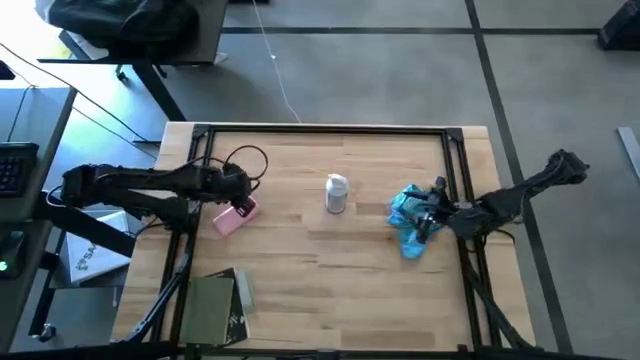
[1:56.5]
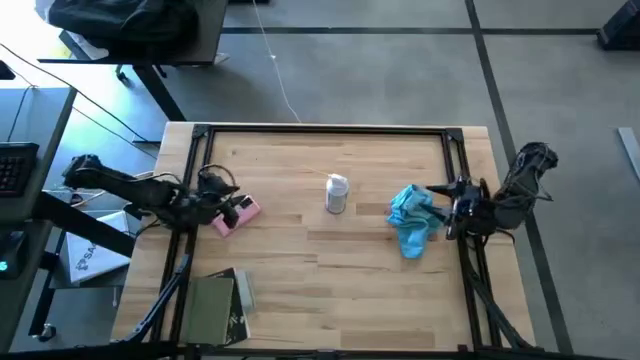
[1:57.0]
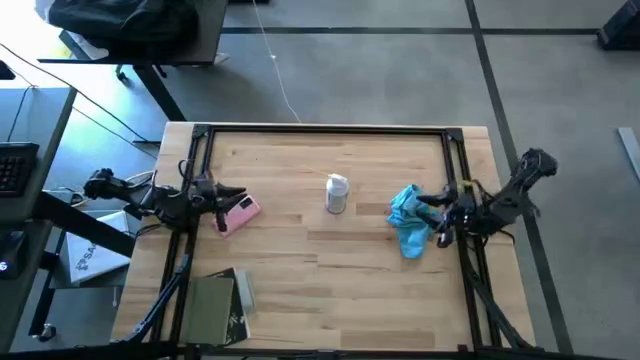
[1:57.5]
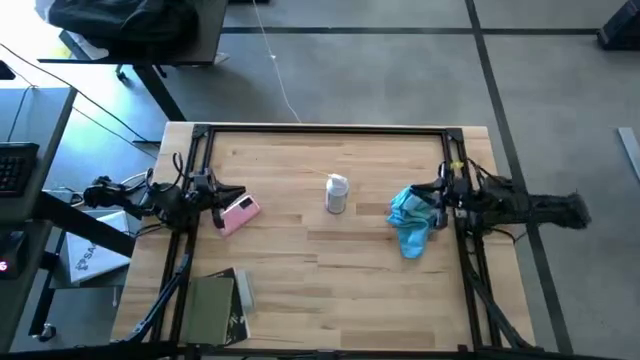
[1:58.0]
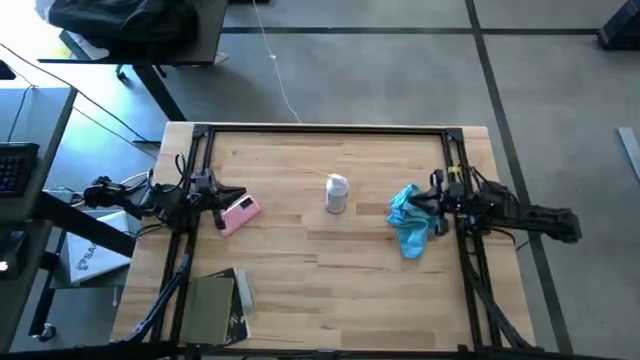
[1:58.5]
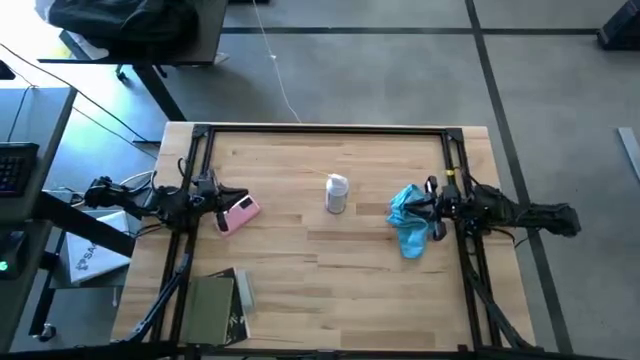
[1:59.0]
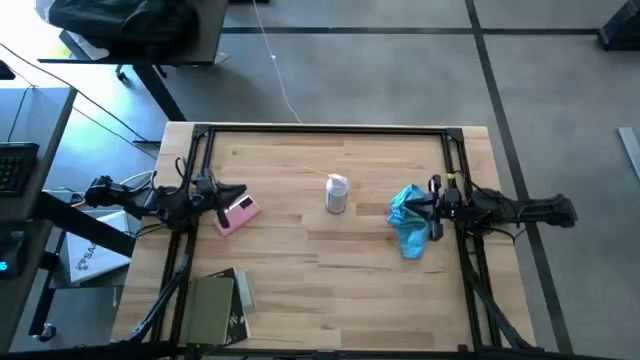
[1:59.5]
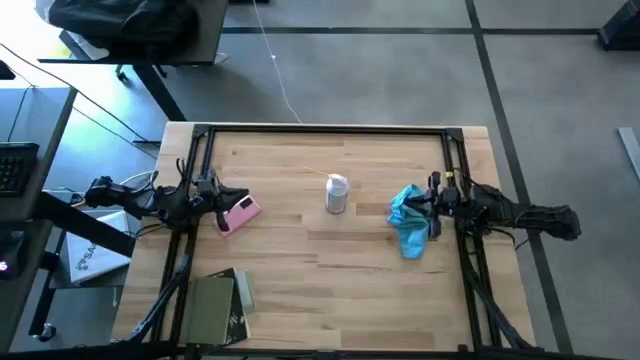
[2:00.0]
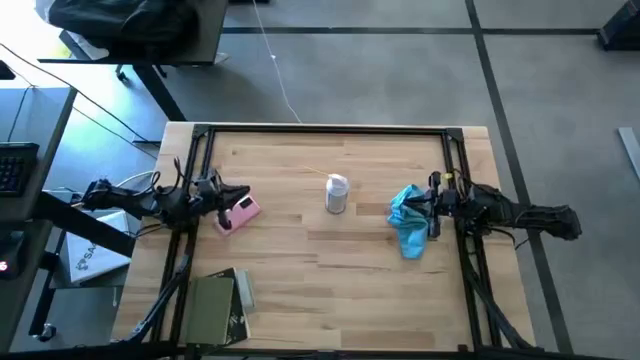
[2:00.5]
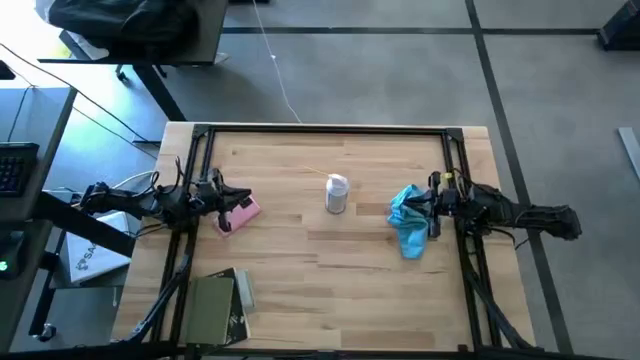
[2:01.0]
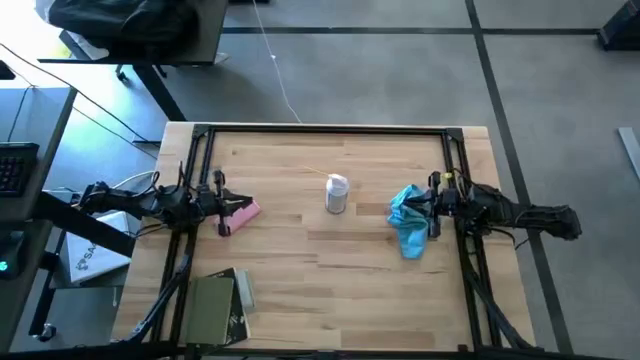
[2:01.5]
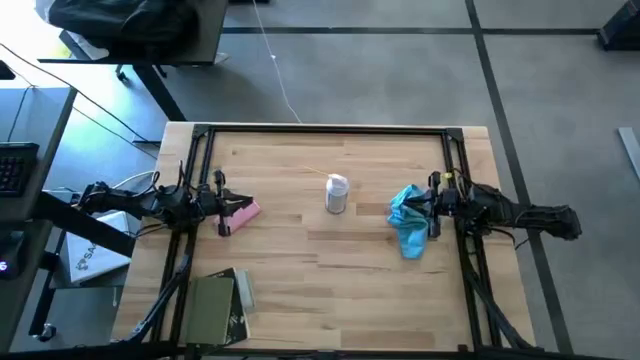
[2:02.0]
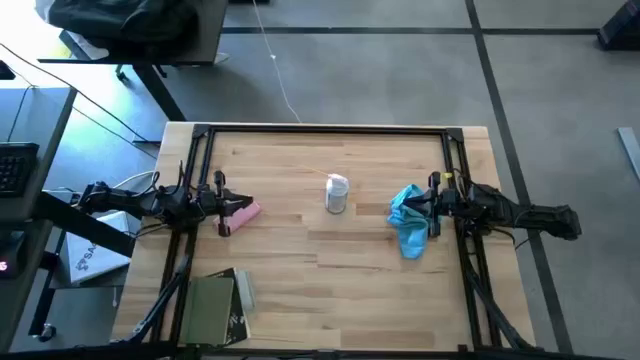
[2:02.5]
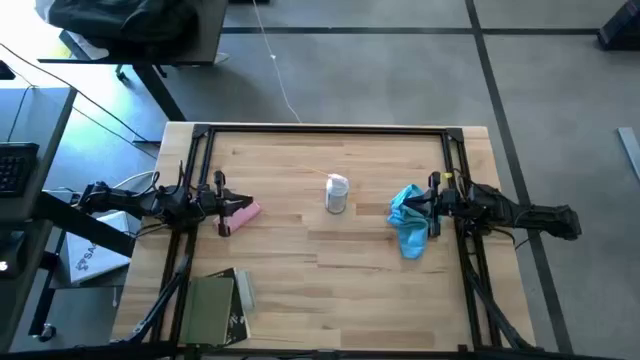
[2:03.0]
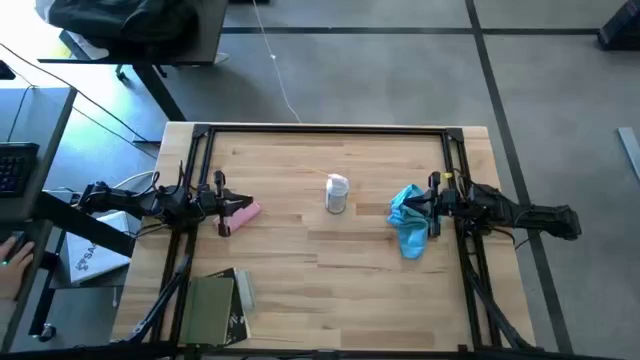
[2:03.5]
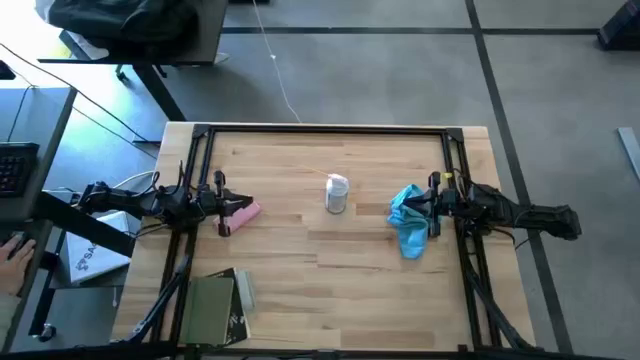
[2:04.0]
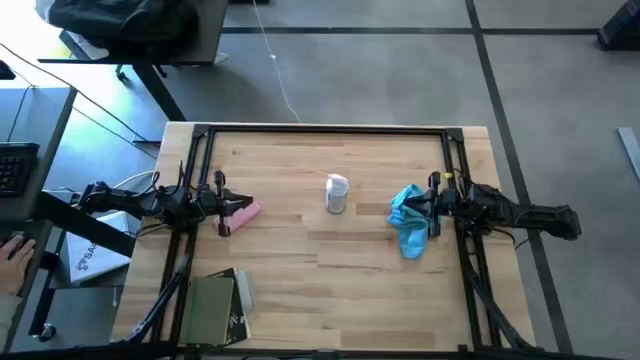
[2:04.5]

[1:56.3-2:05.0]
Task: Apply microfiber cloth
Return to Home Position

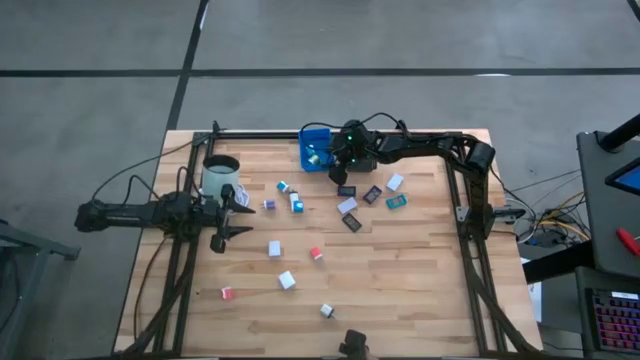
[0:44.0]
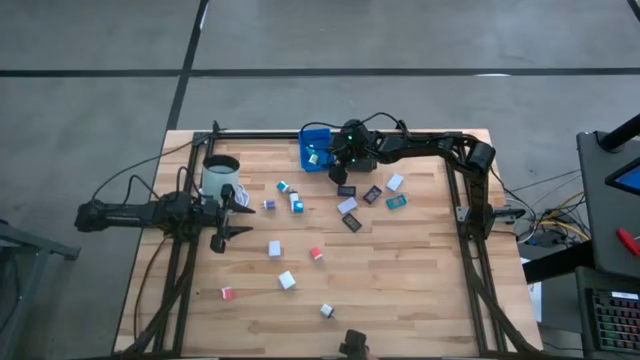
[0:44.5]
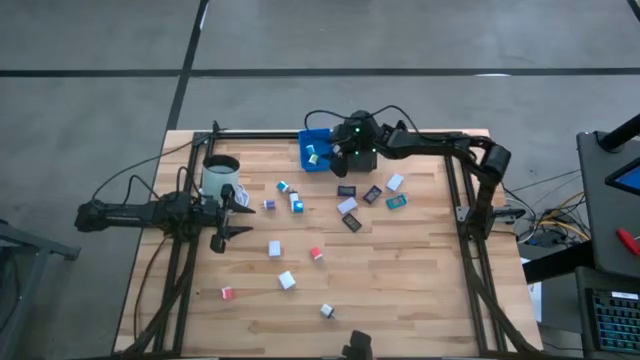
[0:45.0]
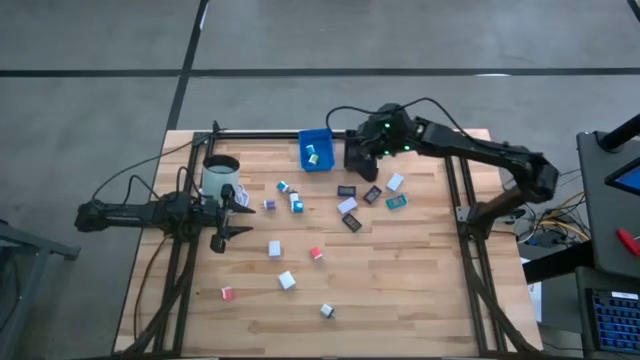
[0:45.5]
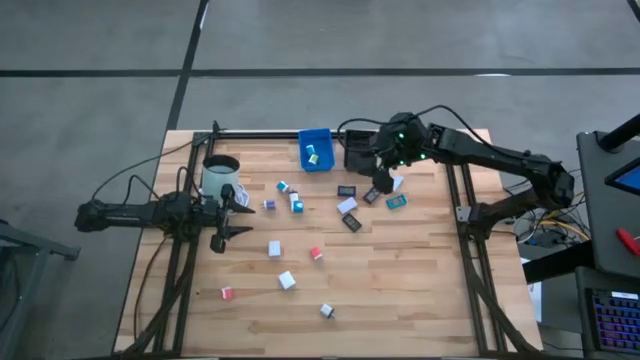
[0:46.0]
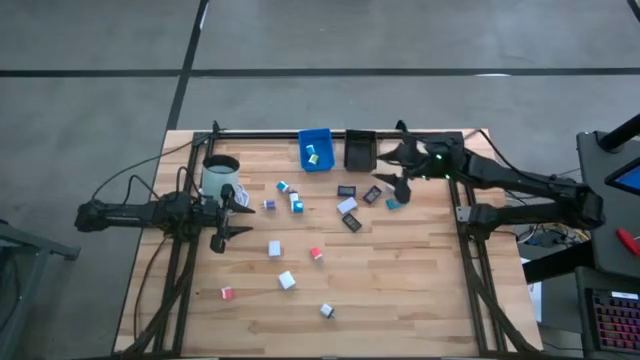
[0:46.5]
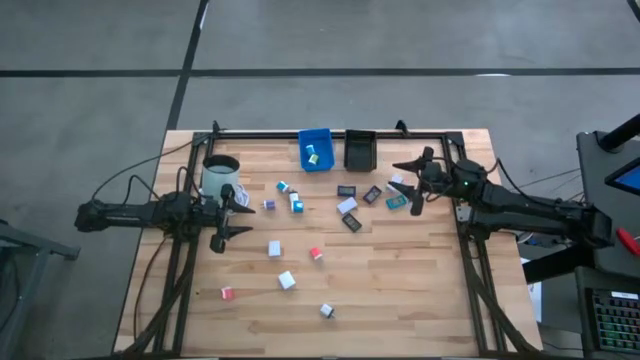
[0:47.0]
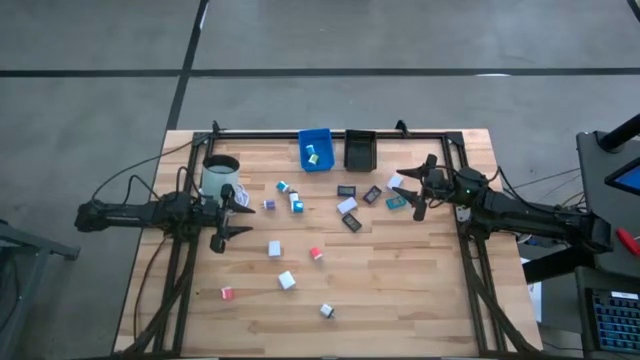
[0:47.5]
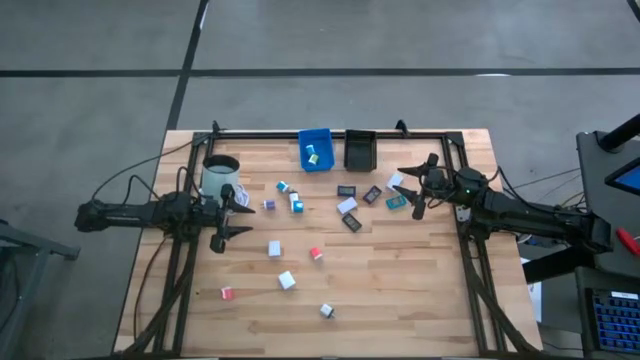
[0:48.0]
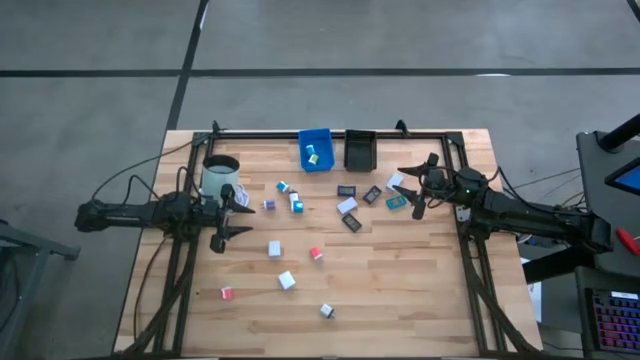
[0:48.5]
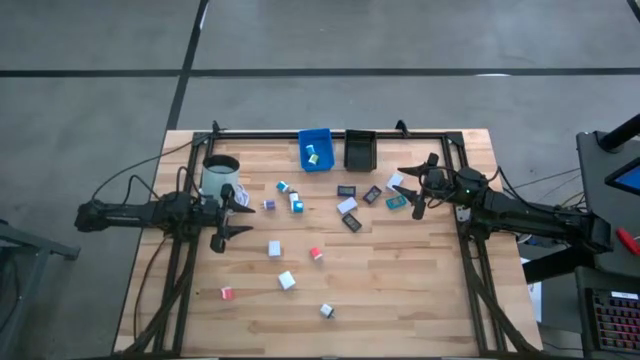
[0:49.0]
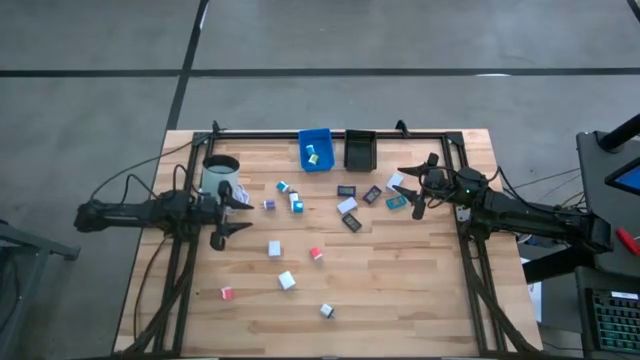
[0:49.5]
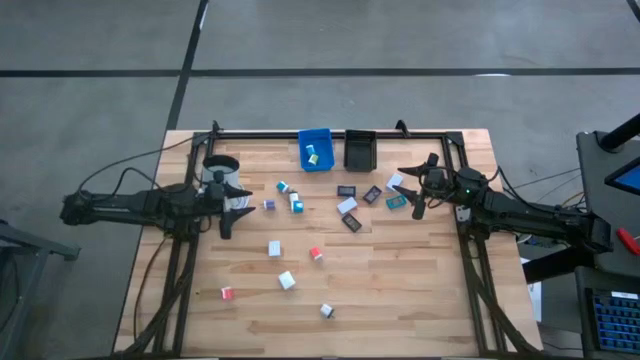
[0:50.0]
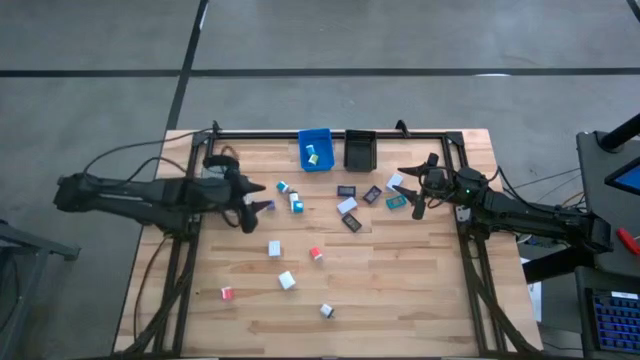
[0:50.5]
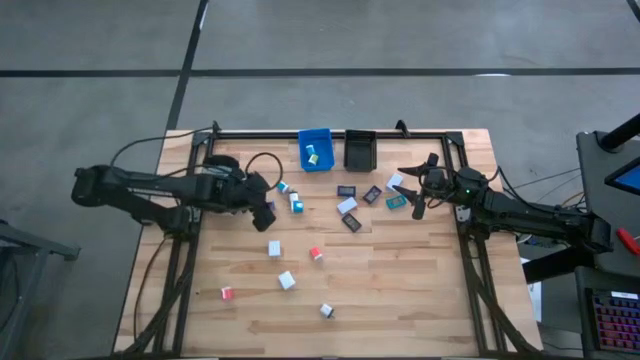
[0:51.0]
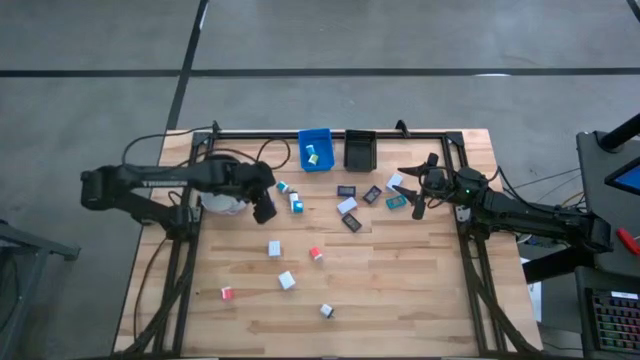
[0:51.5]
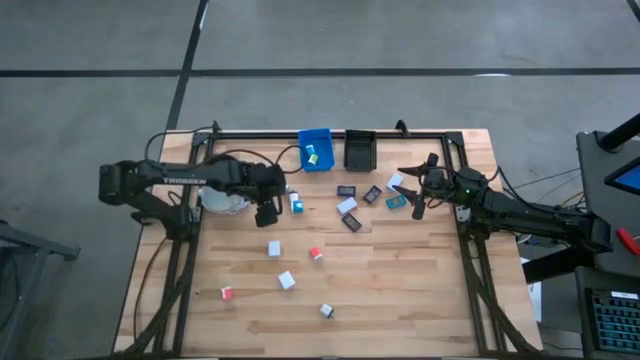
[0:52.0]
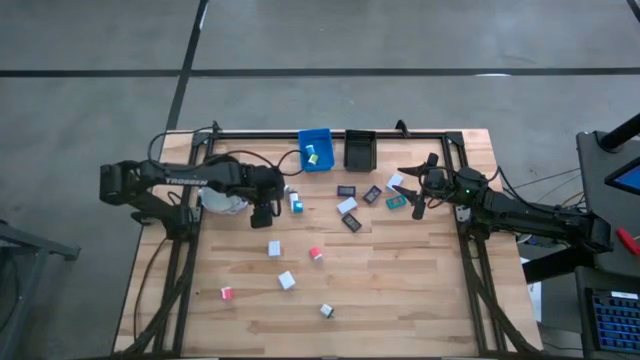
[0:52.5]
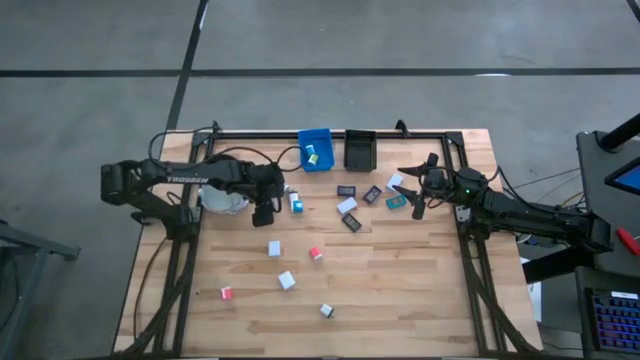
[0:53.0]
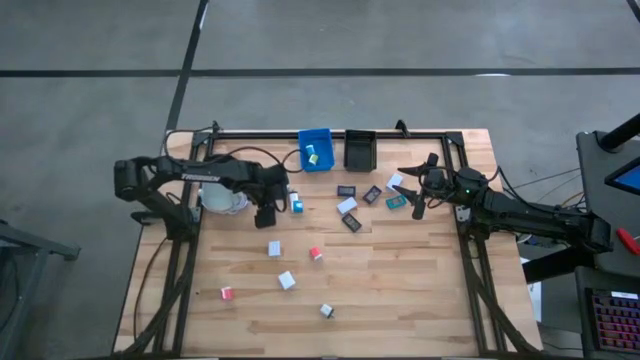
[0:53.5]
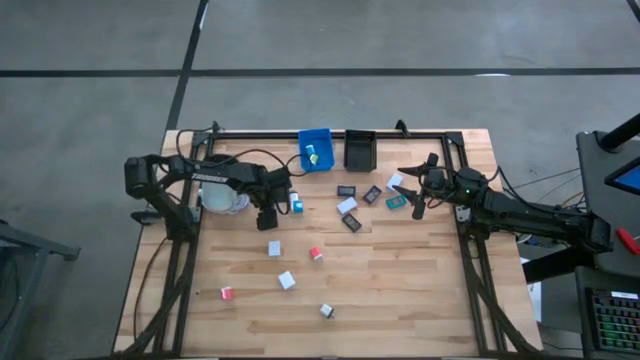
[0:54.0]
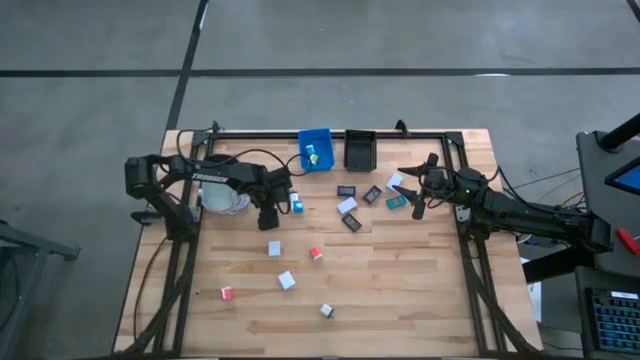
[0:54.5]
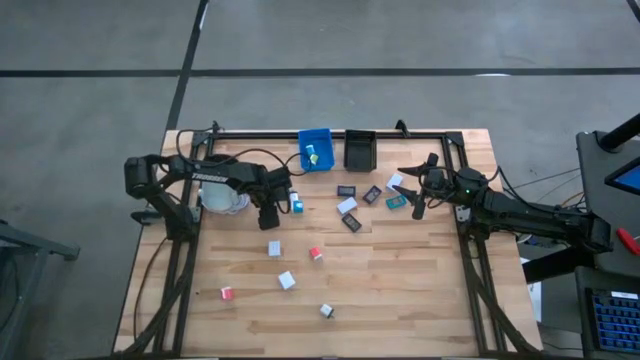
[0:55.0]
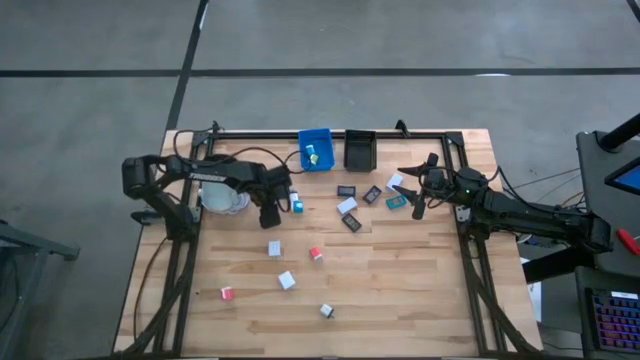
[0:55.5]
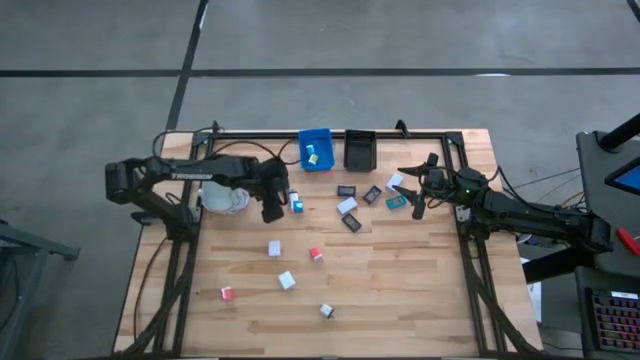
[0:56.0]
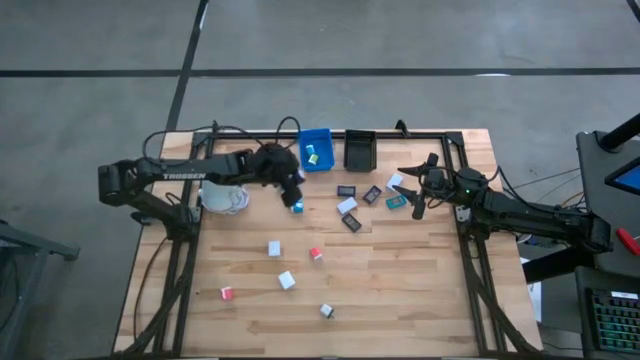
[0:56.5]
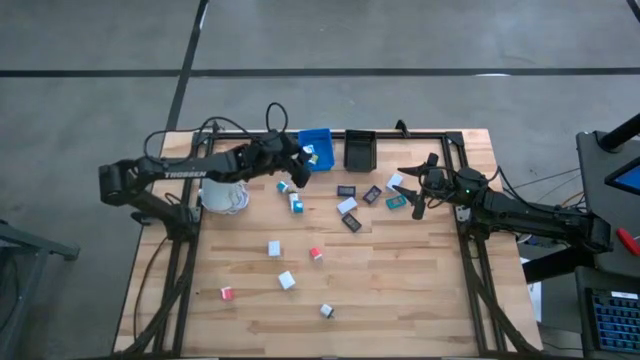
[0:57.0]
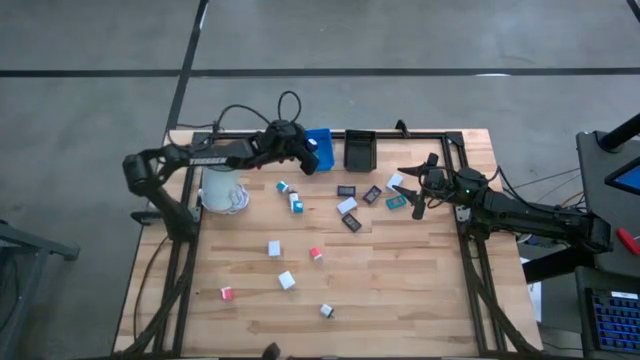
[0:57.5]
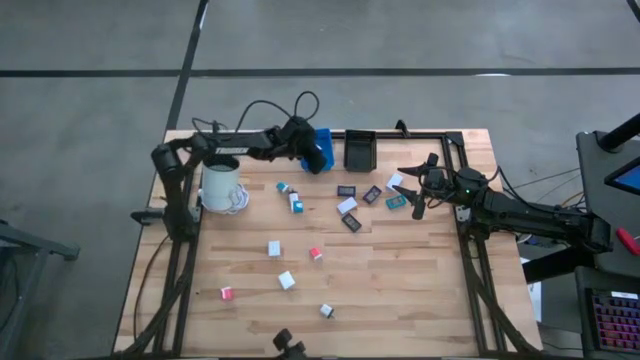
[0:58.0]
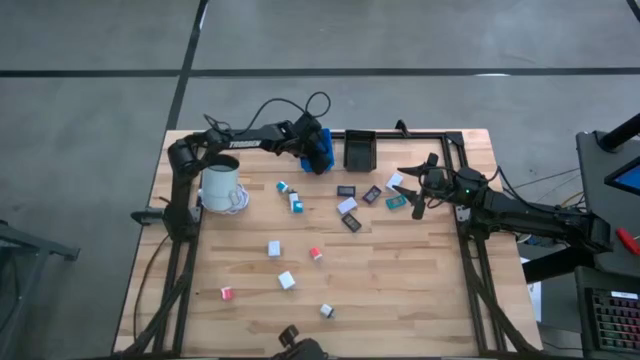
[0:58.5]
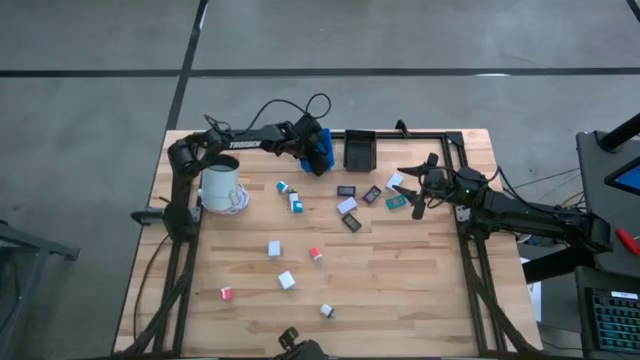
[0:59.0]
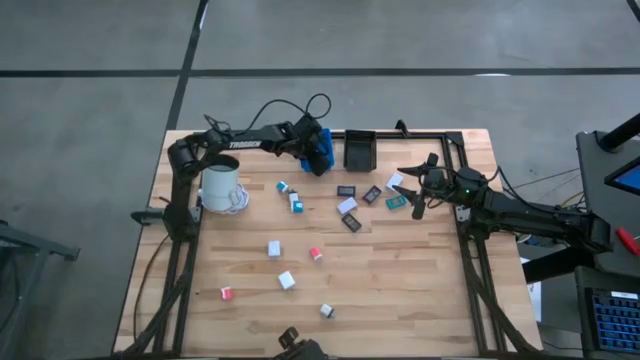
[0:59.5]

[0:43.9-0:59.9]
Task: Pick & Place Office items
Put the small purple adapter into the blue basket
